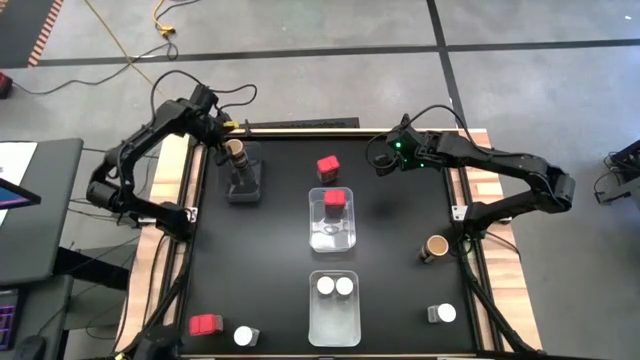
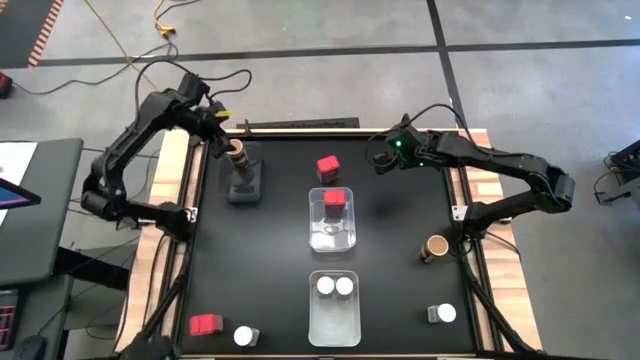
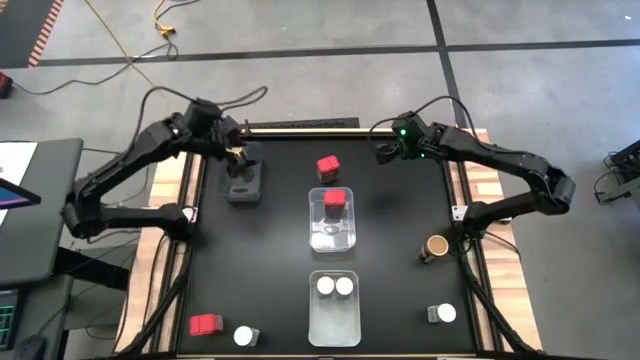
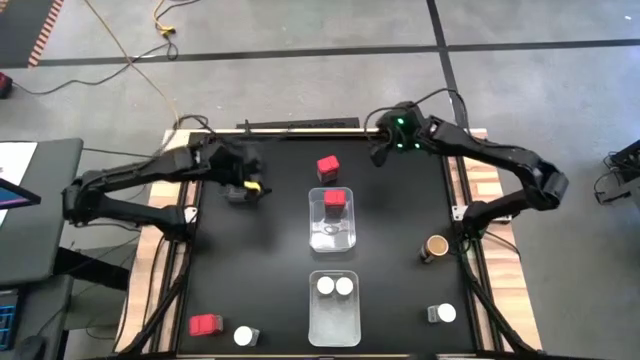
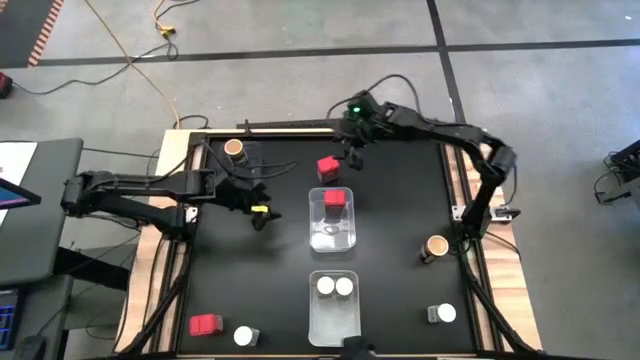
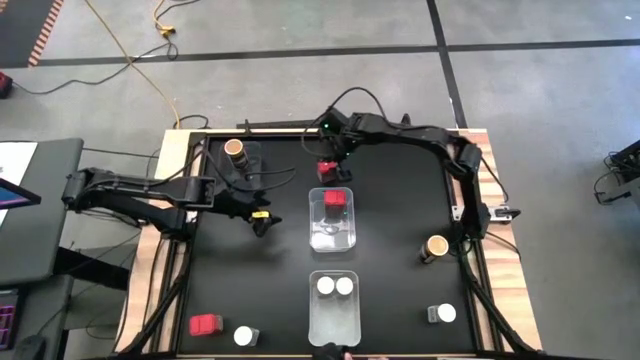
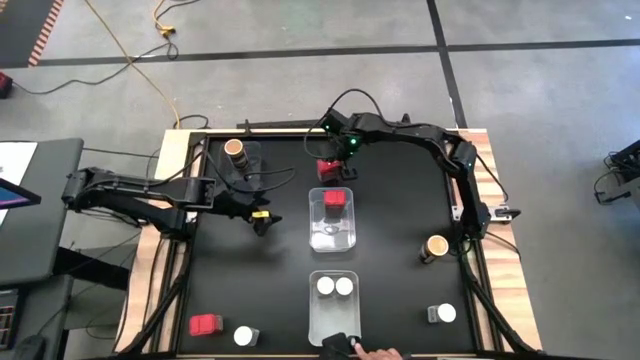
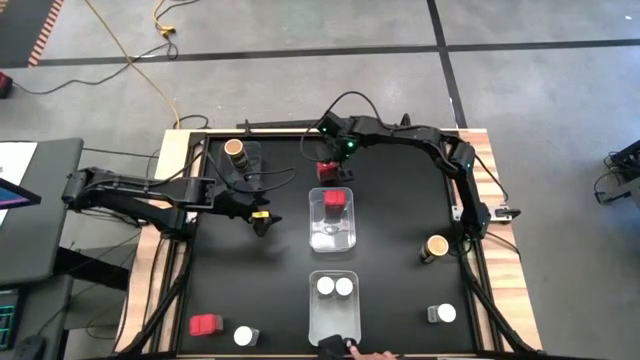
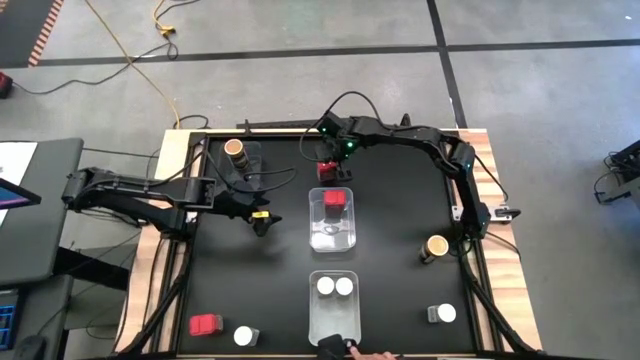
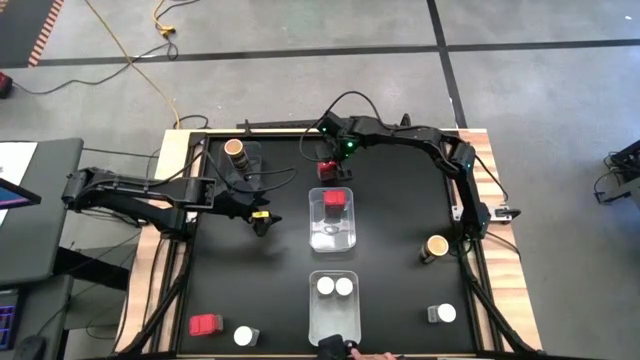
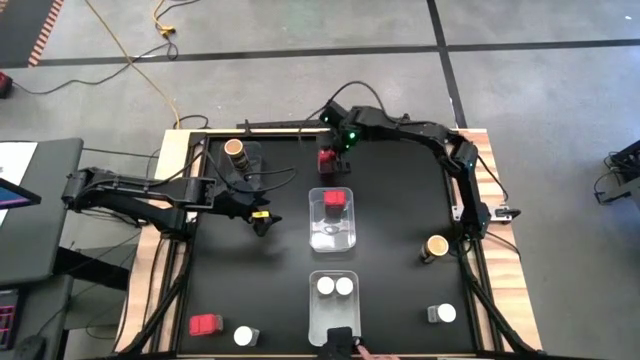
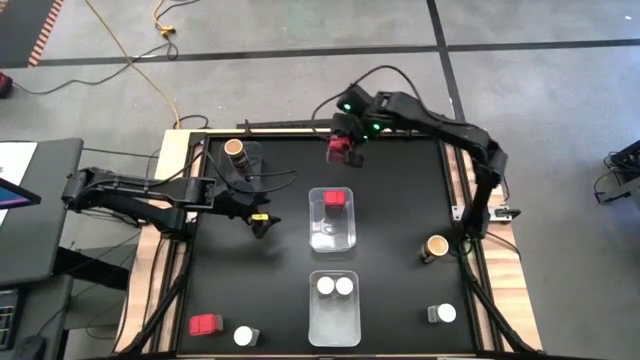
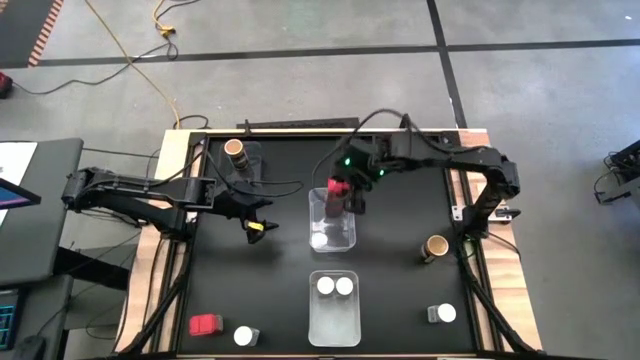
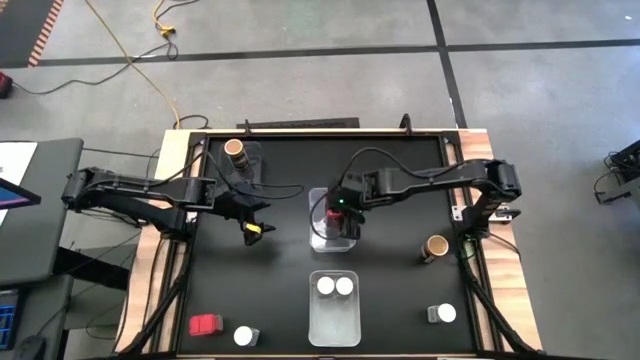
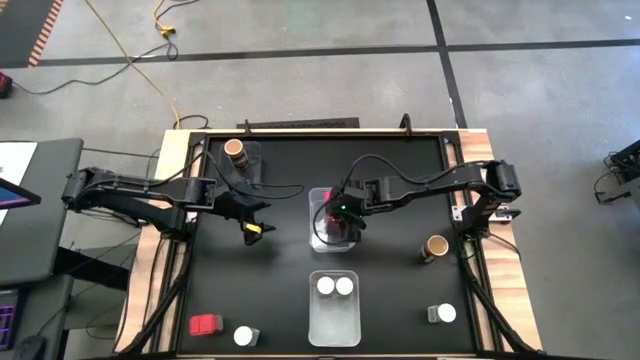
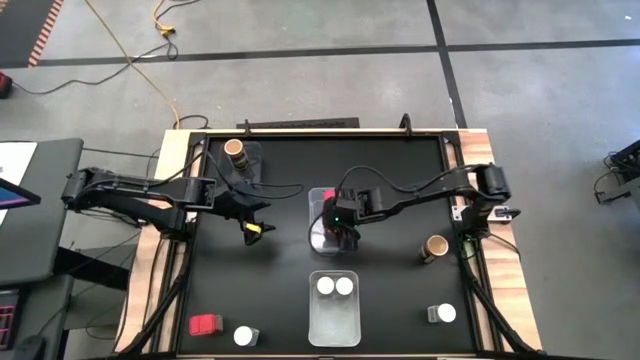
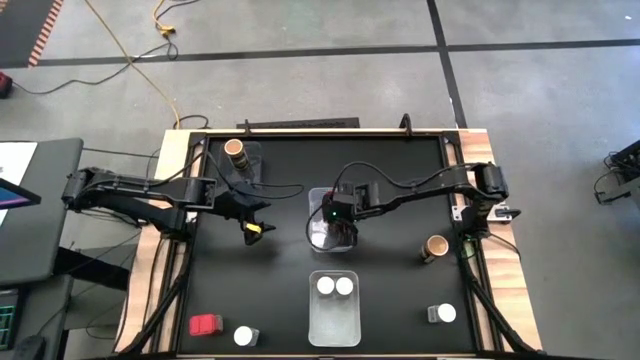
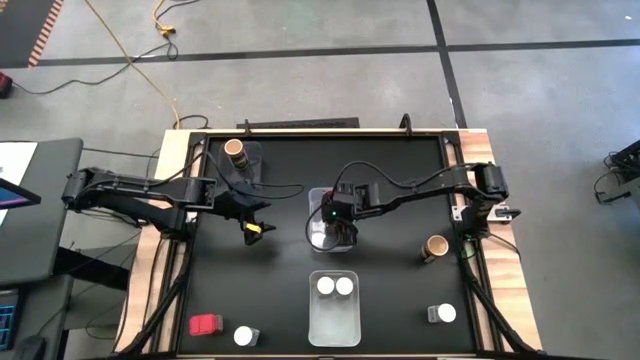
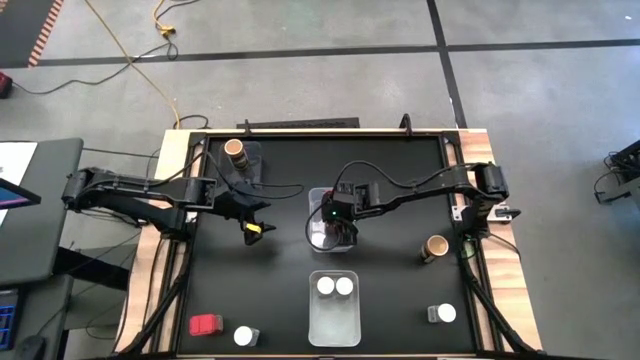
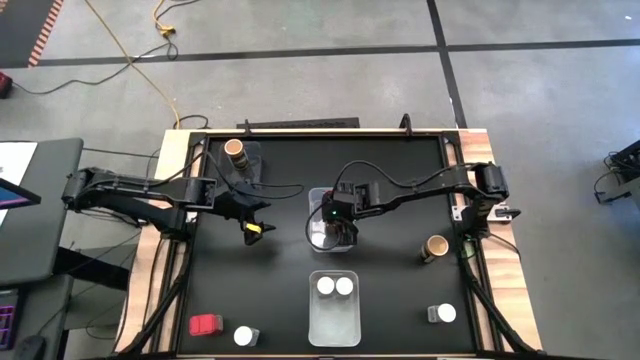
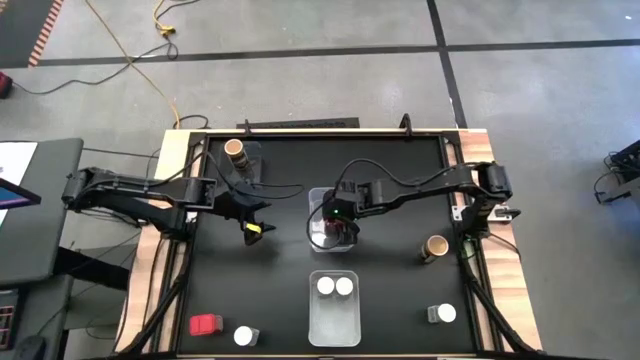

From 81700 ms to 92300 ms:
Task: Sort spices by type
Put the red seasoning can into the transparent bin

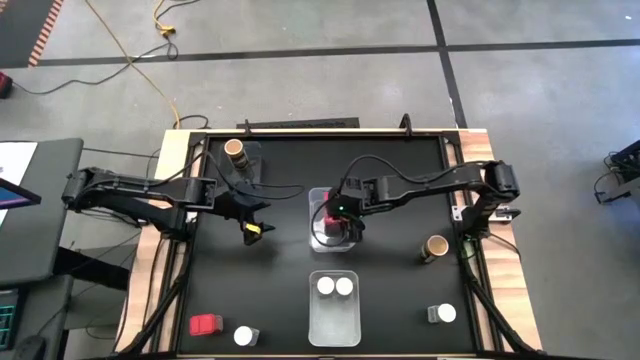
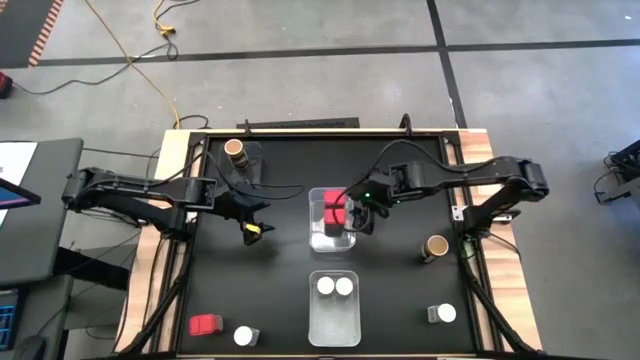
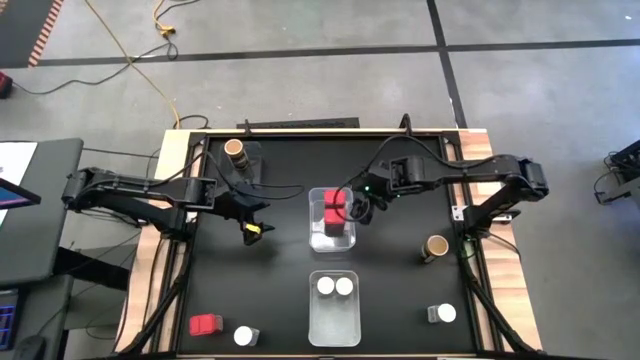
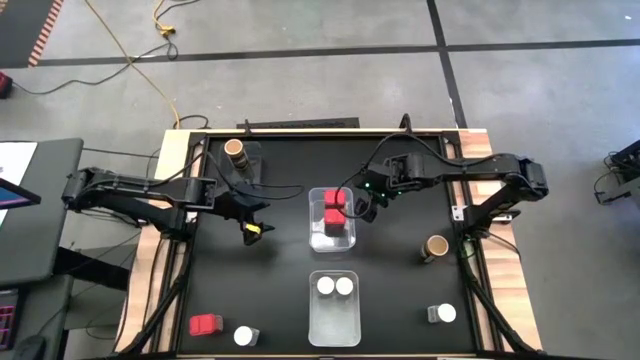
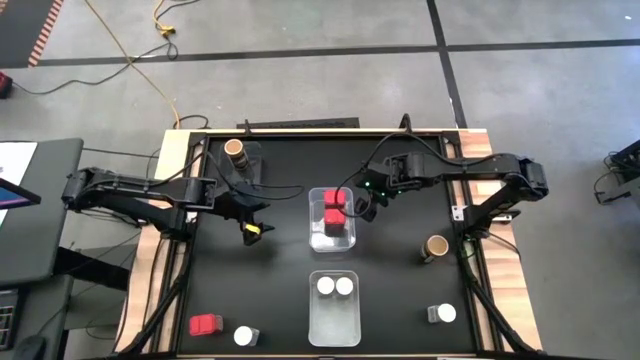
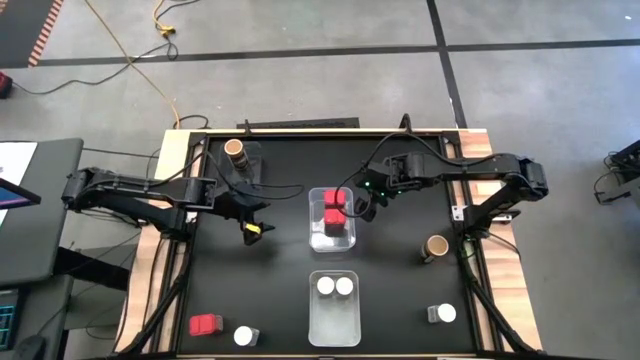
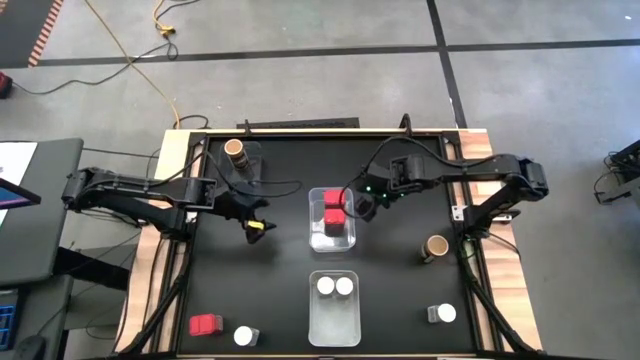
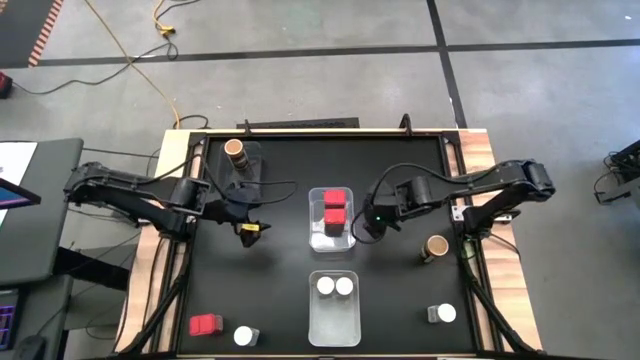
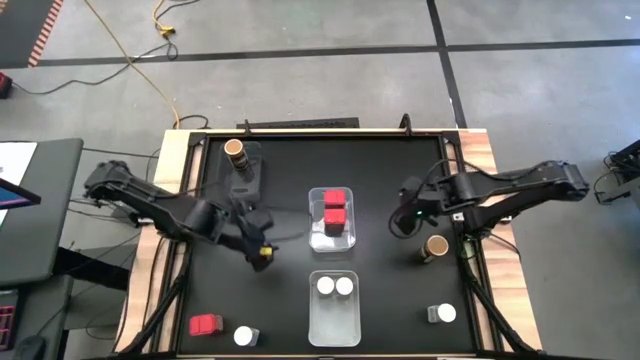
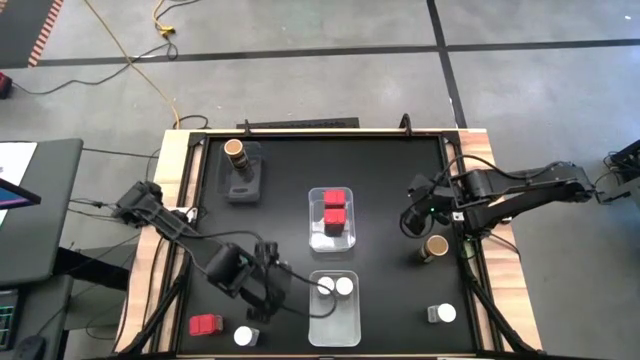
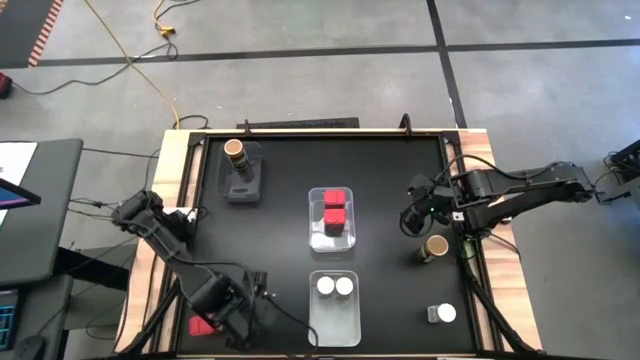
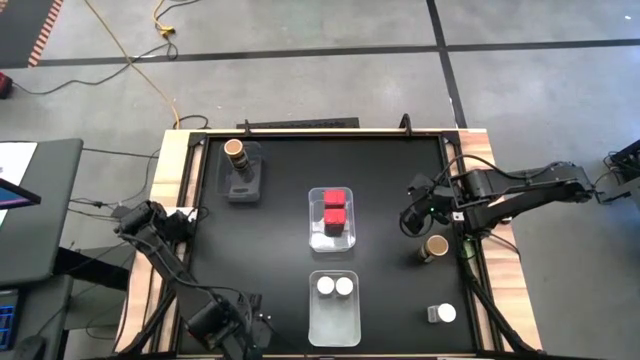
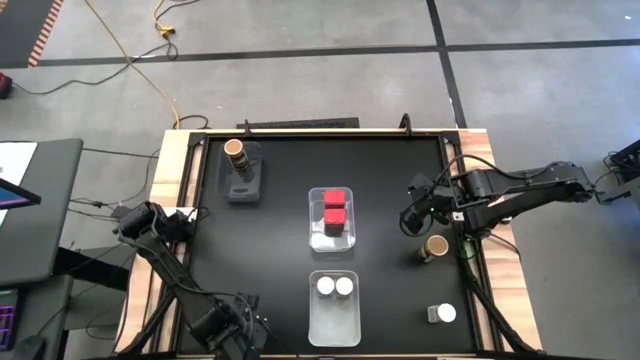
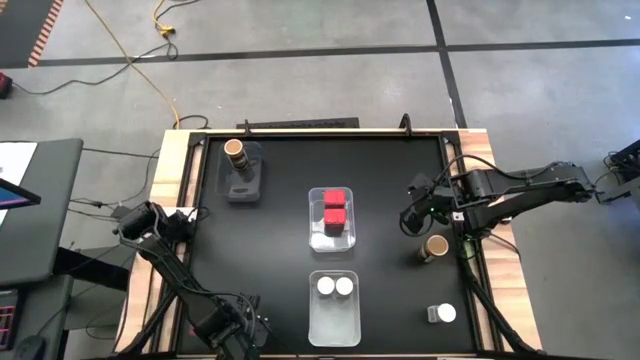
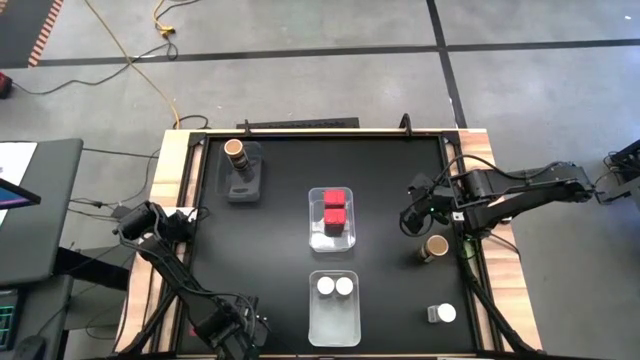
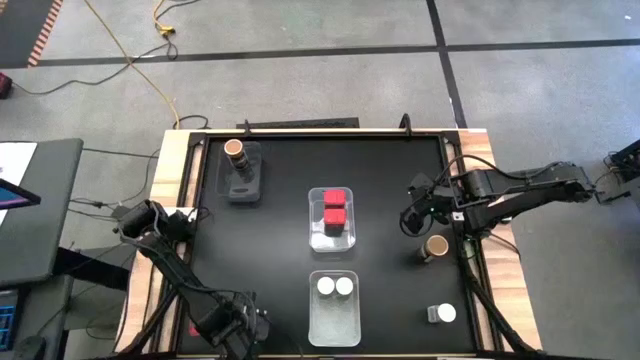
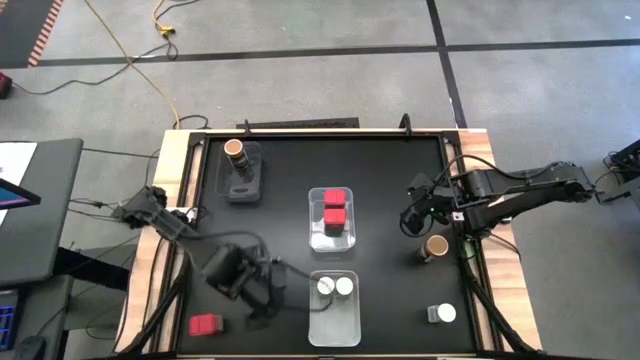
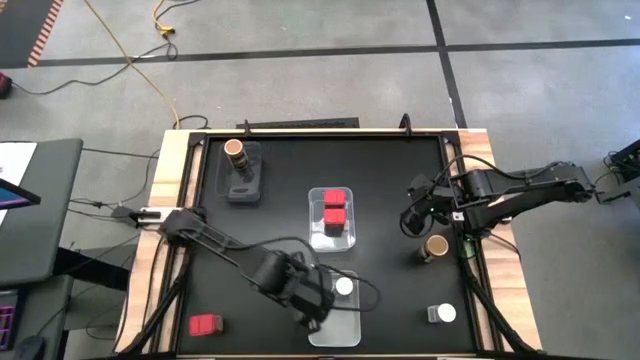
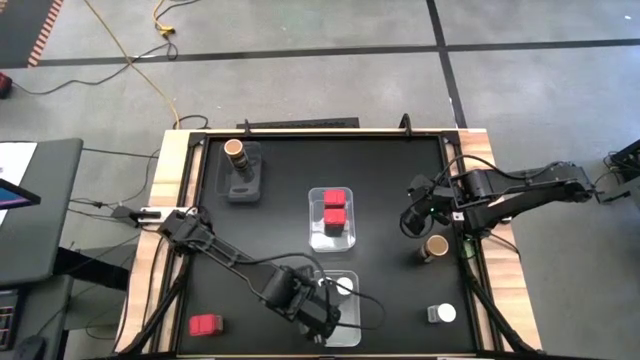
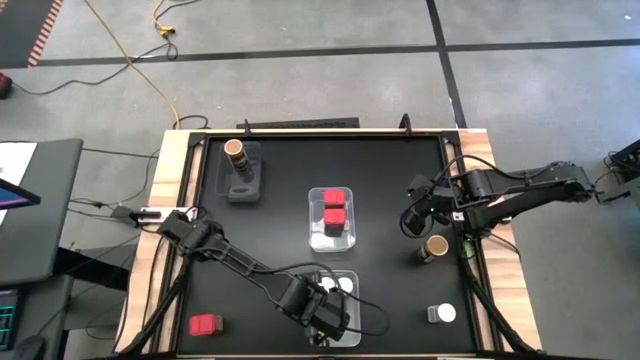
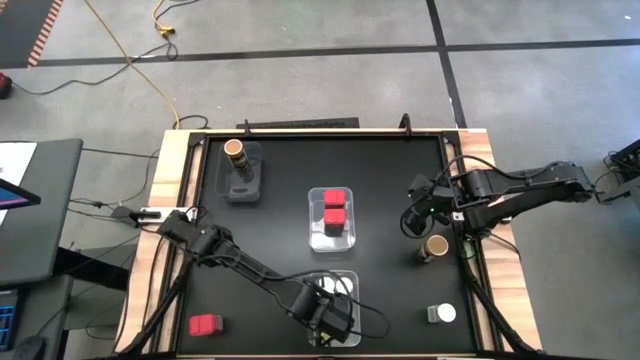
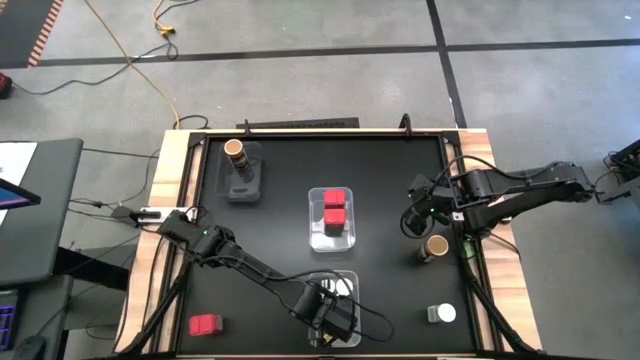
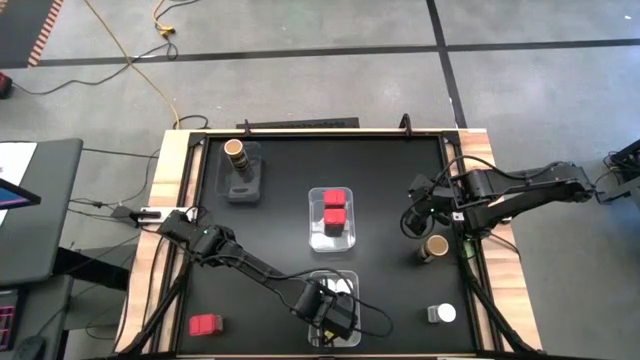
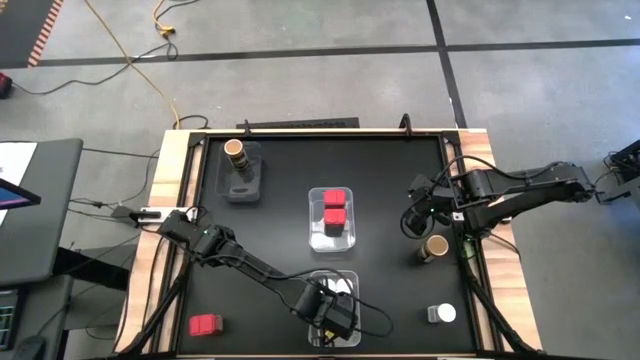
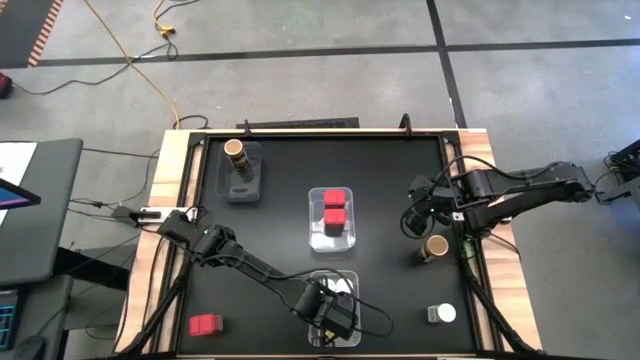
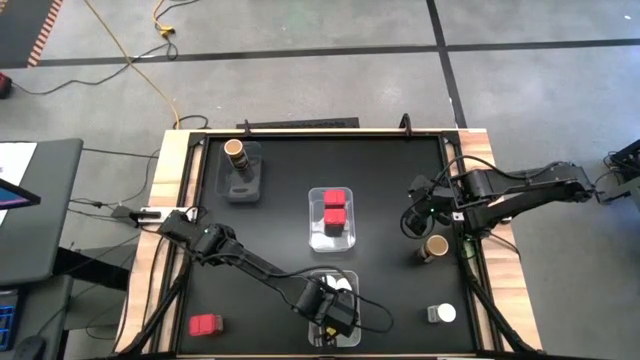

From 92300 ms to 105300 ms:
Put the white seasoning bottle into the white bin
